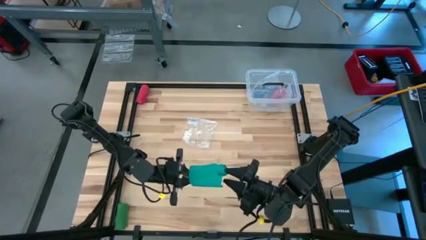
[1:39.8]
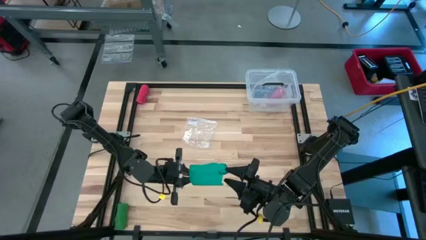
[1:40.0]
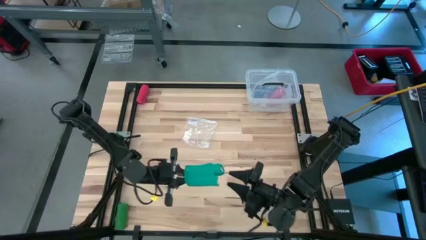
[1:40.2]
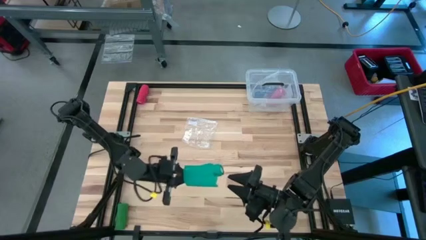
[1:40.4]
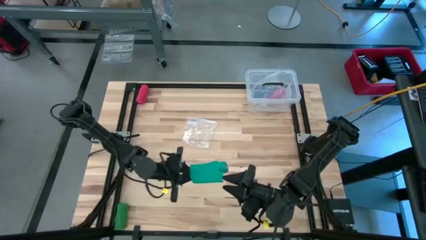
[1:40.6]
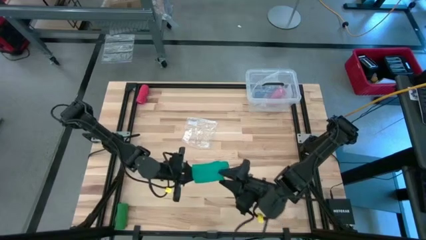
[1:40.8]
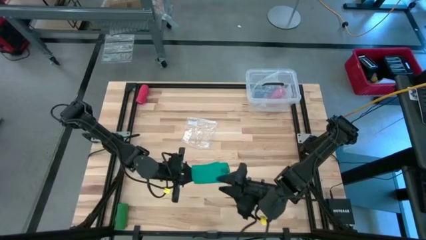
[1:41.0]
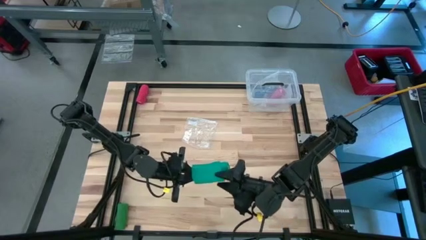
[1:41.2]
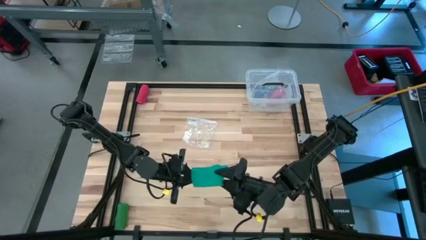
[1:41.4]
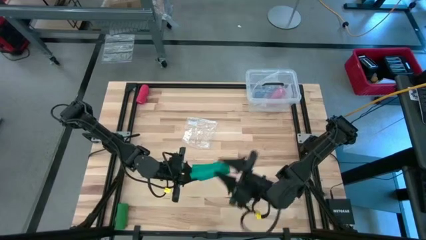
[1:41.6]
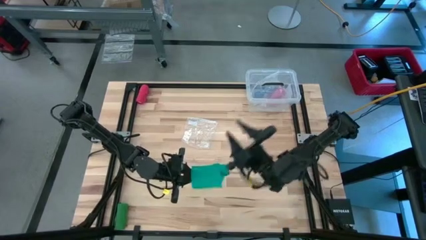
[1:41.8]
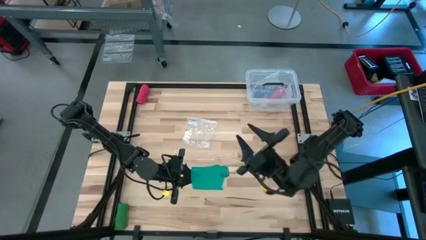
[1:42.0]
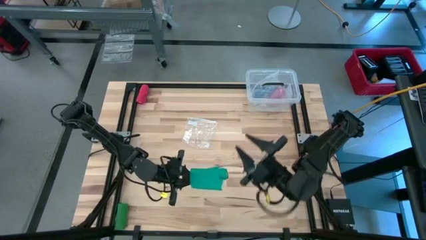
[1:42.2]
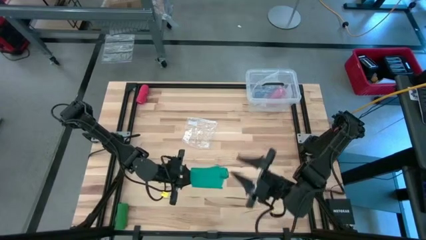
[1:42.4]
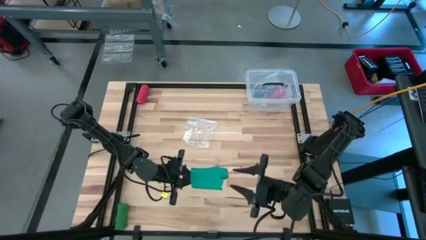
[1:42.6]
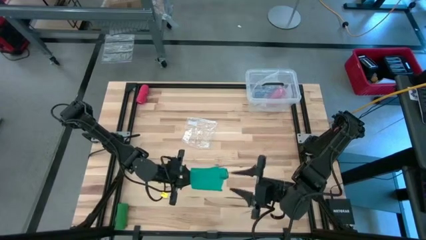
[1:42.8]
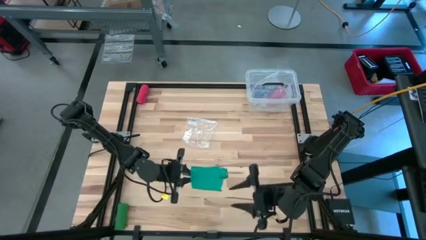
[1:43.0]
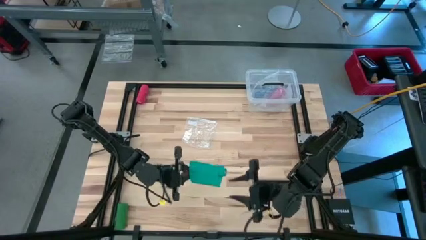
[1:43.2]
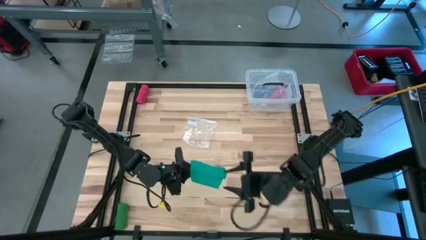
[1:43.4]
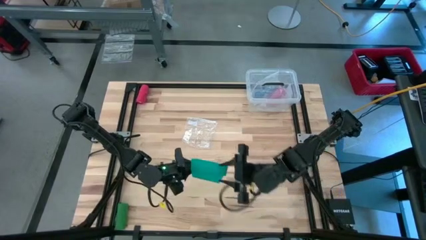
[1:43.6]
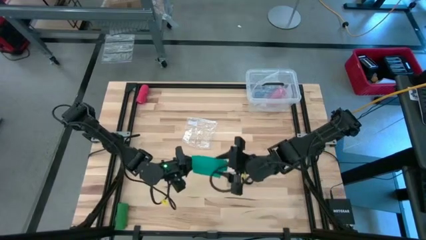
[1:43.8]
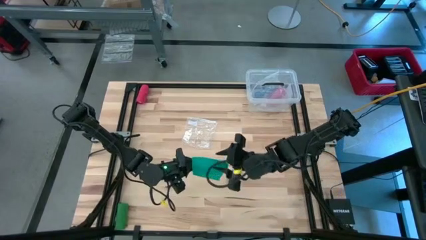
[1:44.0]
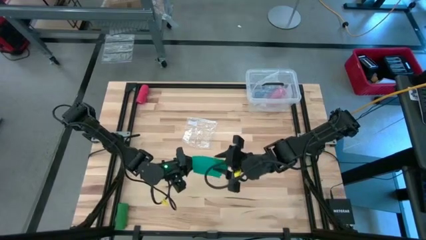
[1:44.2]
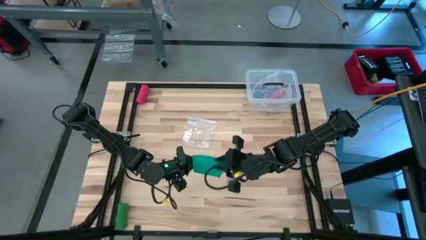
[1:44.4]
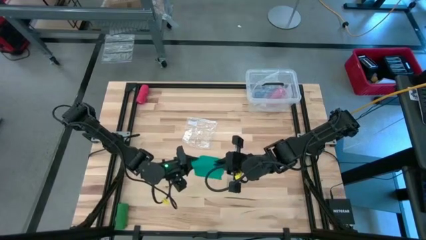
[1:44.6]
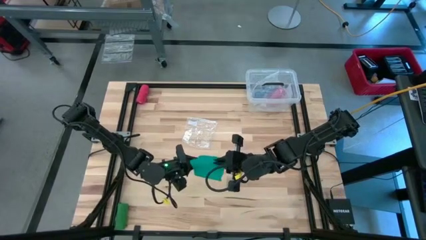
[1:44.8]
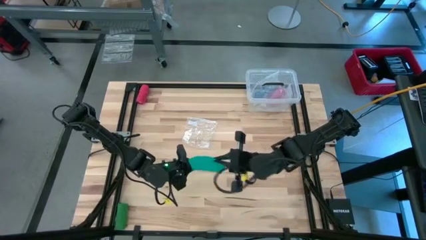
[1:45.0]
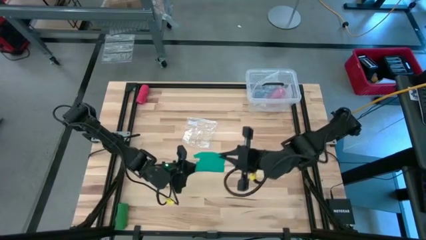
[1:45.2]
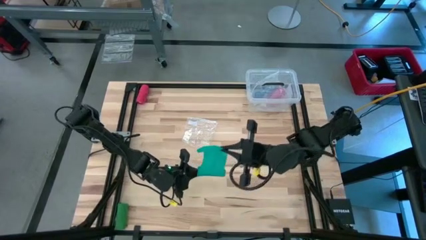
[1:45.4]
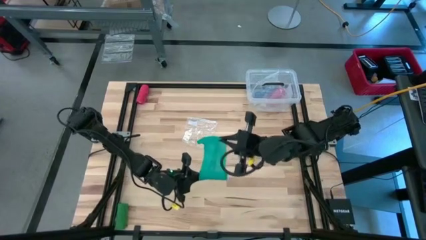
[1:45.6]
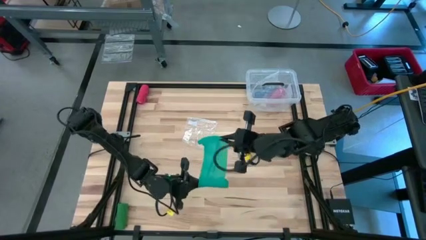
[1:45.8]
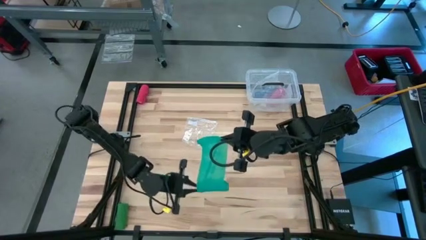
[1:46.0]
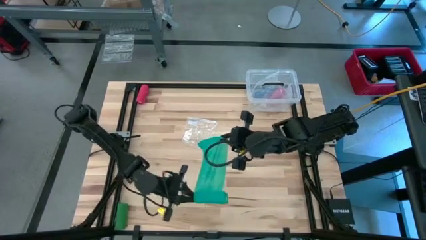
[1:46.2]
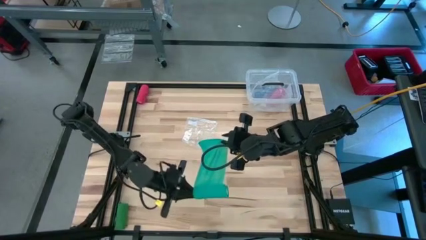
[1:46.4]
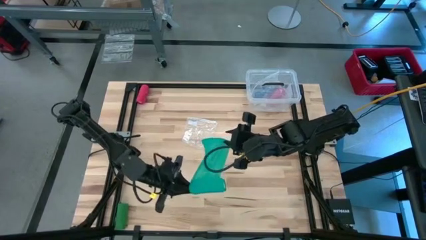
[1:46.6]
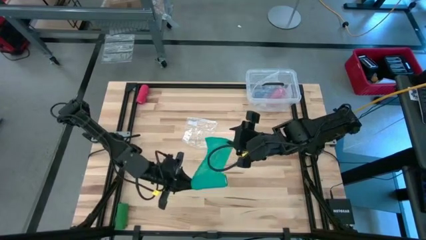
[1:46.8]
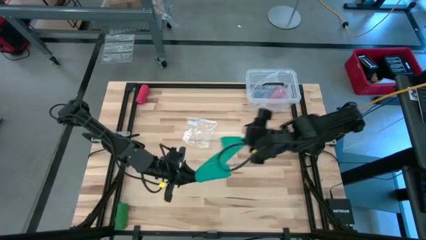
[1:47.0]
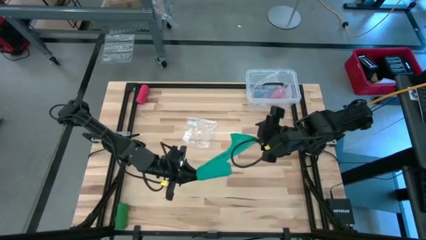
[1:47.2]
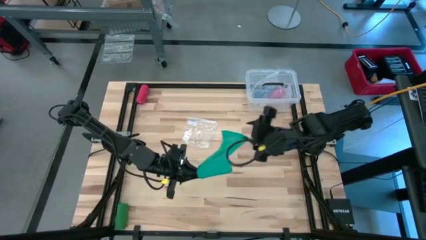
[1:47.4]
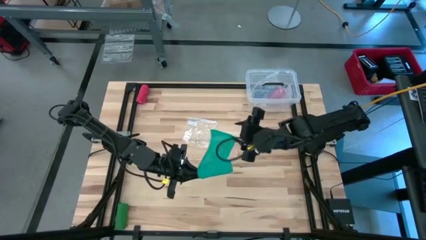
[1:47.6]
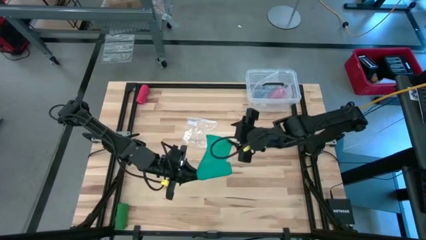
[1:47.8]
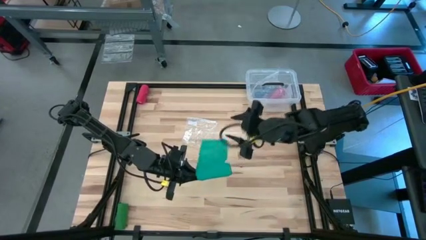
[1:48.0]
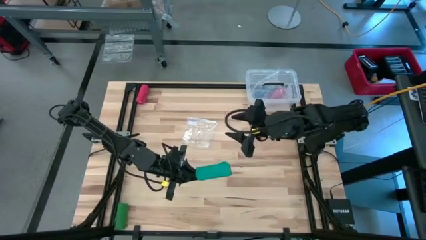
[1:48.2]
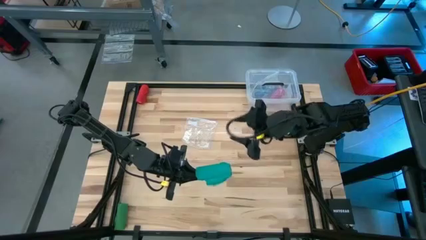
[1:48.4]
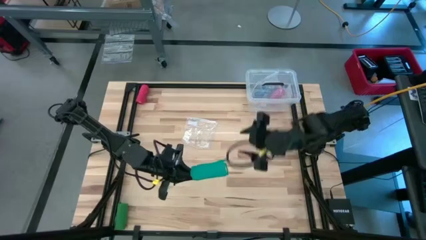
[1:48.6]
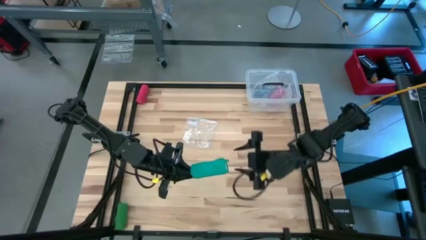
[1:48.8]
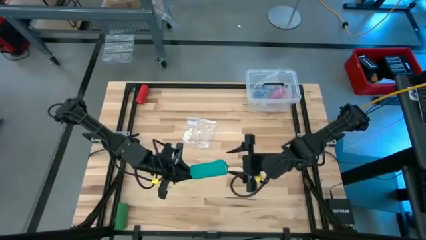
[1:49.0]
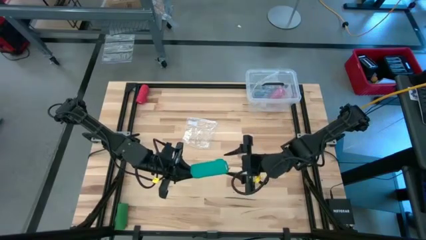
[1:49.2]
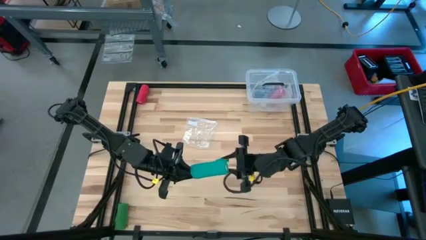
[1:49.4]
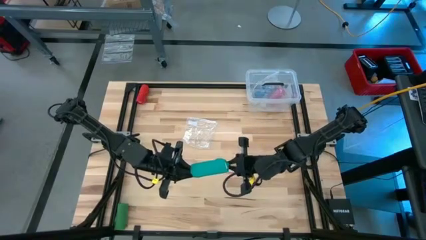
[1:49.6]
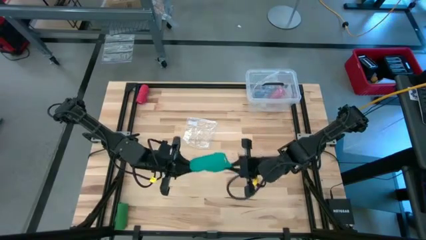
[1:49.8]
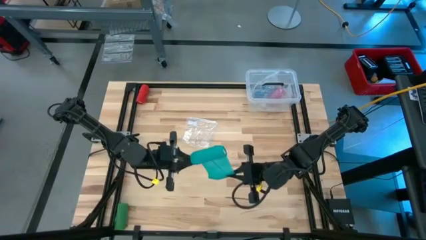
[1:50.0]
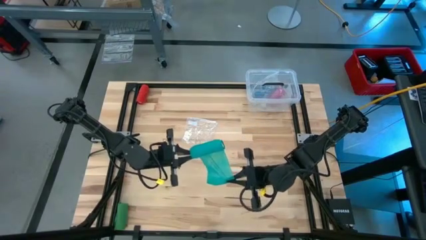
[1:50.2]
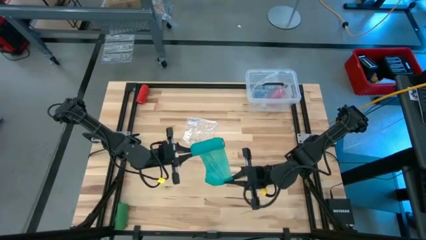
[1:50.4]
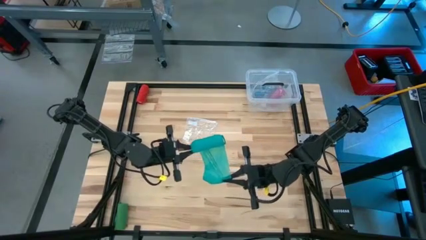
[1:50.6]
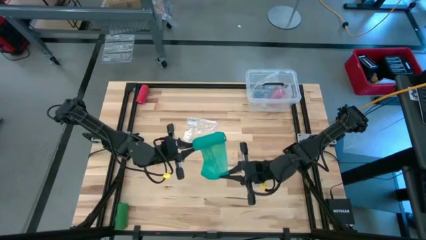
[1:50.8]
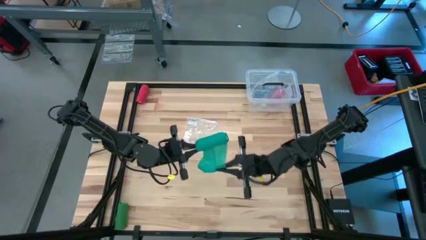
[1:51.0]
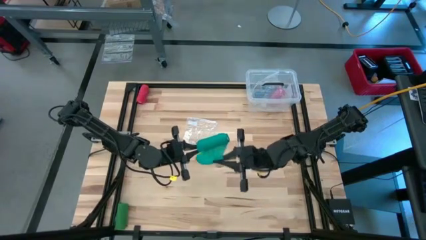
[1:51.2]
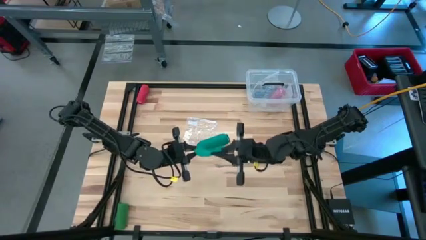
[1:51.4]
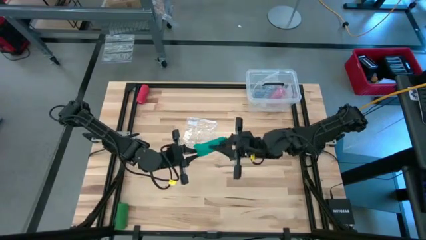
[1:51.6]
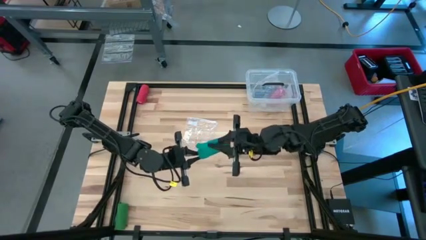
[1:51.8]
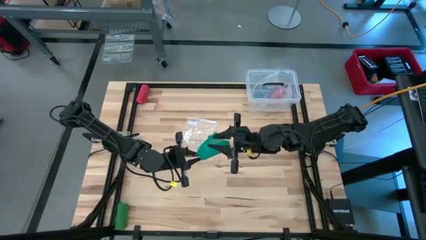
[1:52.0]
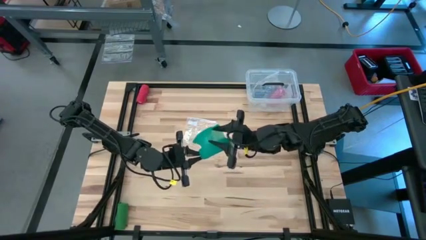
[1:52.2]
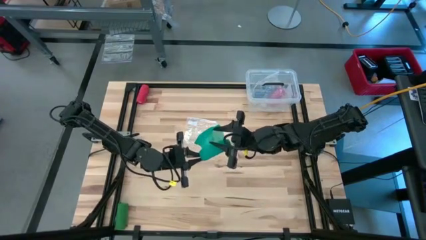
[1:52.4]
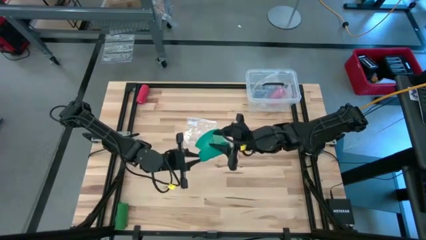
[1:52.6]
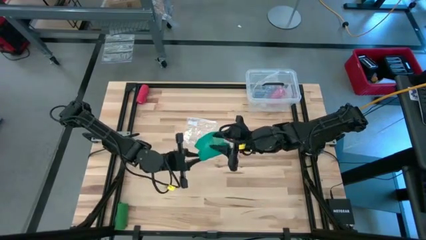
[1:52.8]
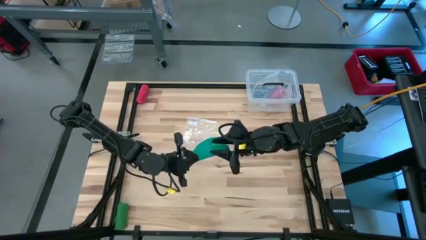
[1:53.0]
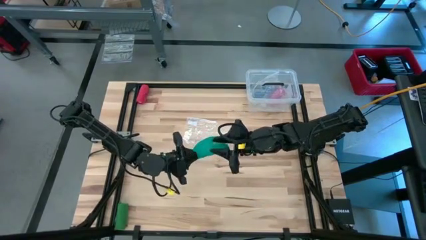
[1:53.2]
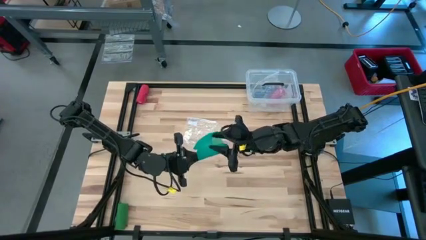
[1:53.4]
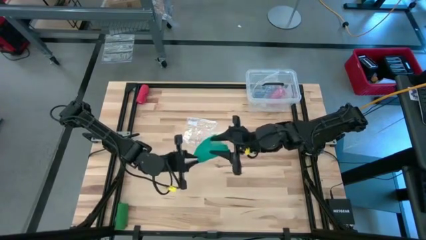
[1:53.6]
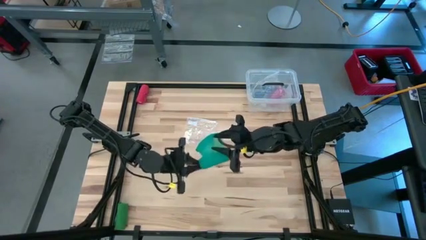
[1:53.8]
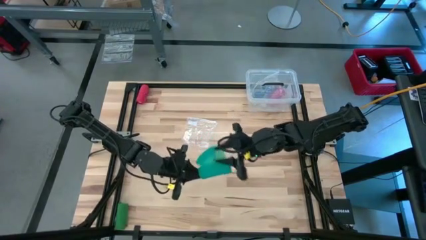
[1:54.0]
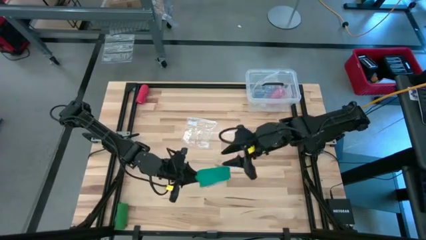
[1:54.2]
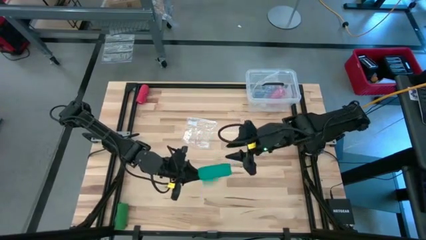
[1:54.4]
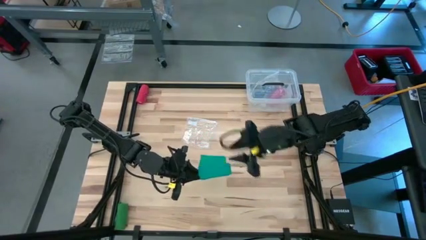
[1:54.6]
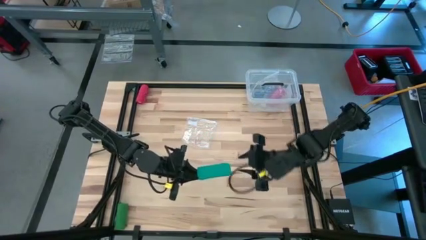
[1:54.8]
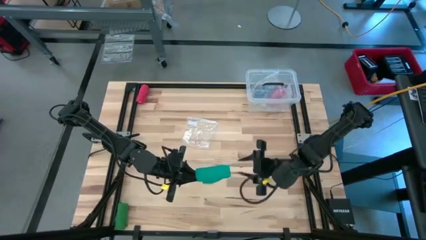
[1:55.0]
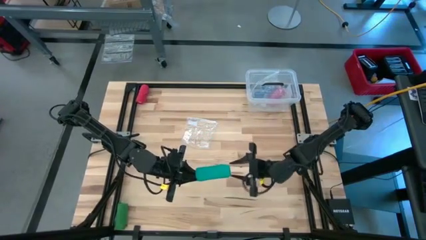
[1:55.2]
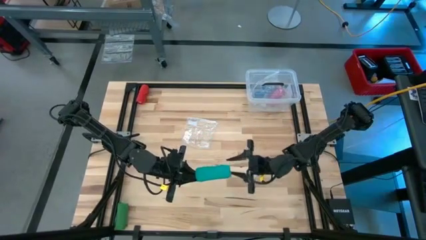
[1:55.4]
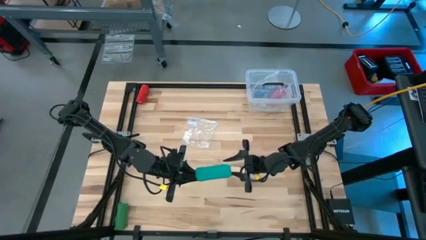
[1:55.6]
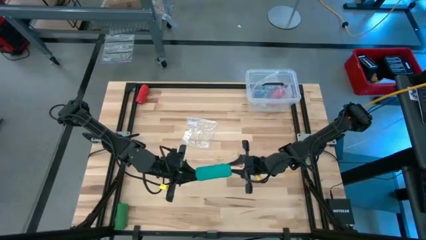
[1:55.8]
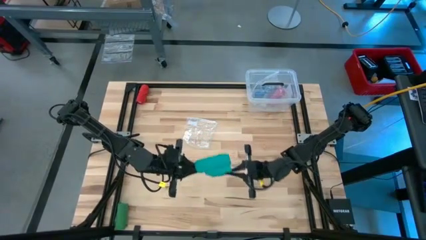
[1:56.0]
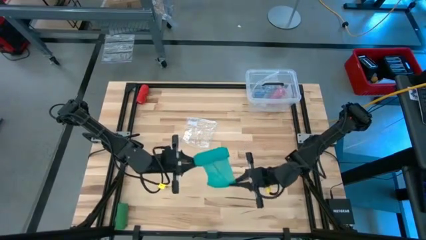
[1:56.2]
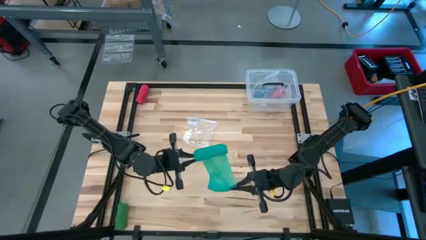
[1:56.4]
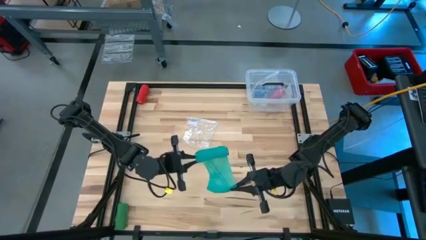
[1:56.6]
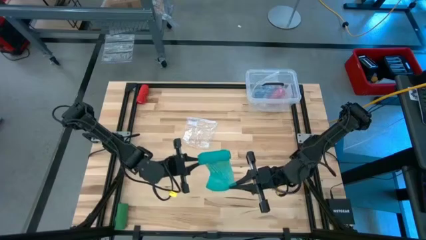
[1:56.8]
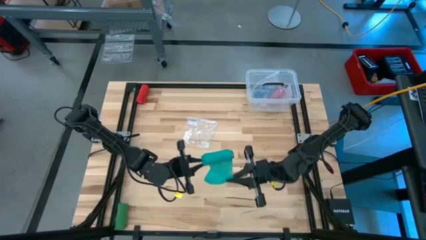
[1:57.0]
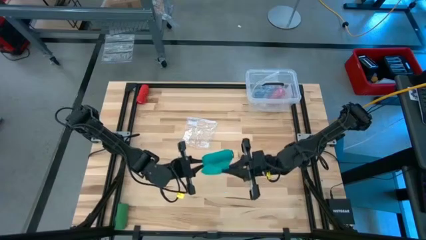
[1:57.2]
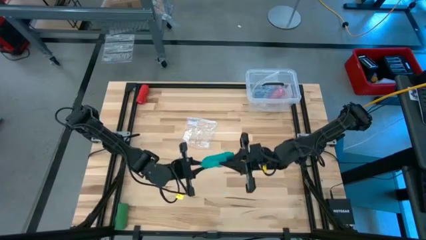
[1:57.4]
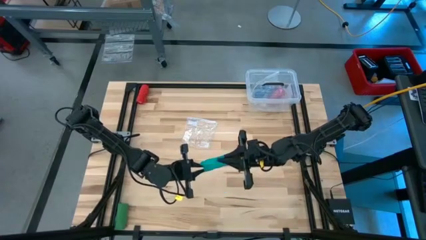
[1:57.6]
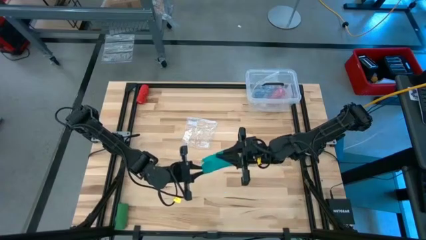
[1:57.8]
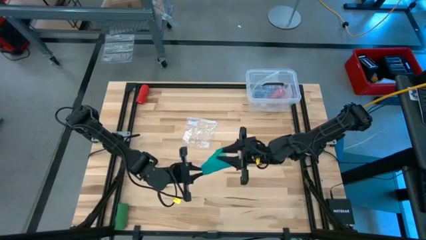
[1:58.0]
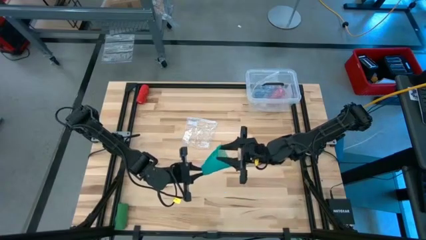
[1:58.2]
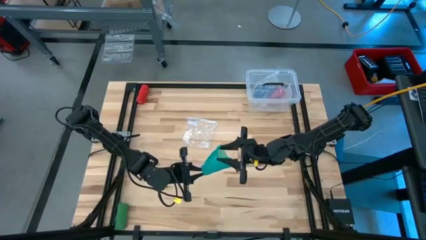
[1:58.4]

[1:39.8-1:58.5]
Task: Roll bandage
Roll the green bandage
